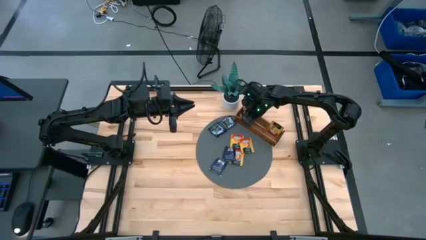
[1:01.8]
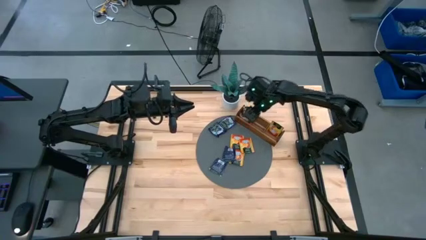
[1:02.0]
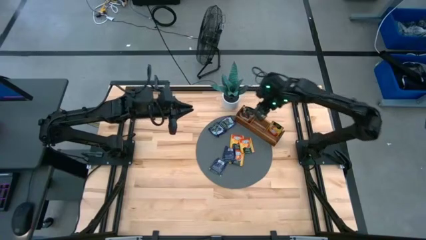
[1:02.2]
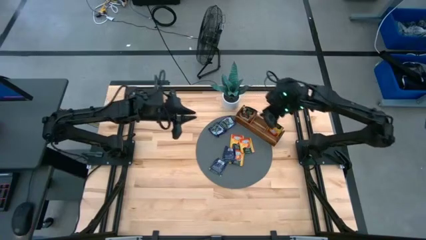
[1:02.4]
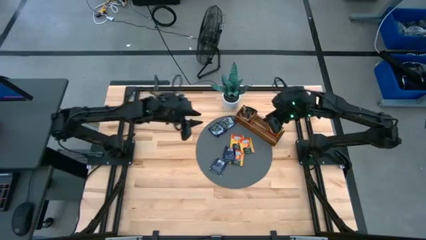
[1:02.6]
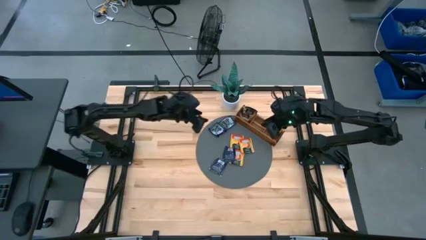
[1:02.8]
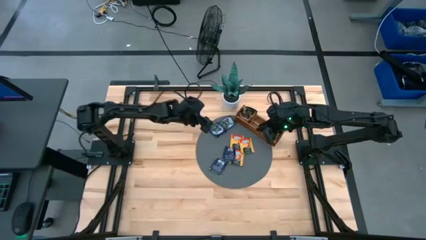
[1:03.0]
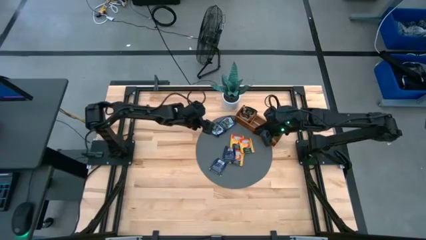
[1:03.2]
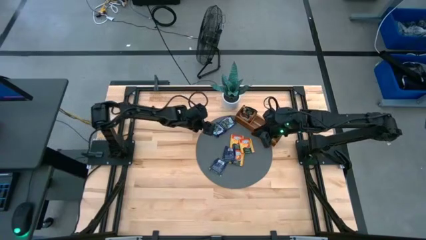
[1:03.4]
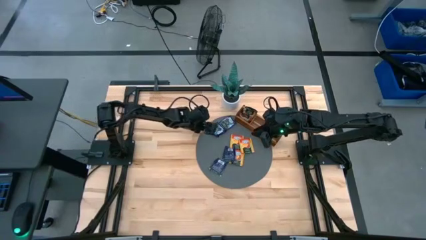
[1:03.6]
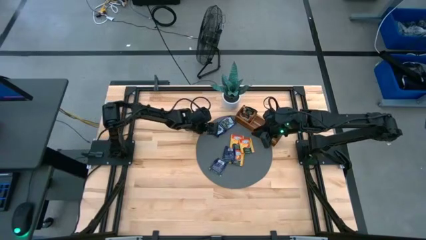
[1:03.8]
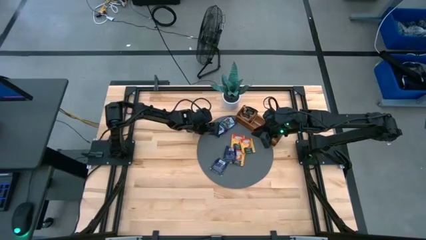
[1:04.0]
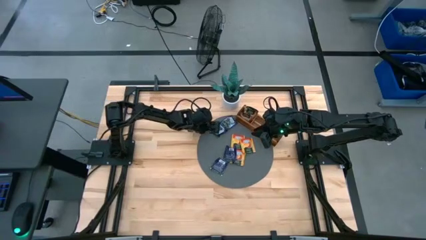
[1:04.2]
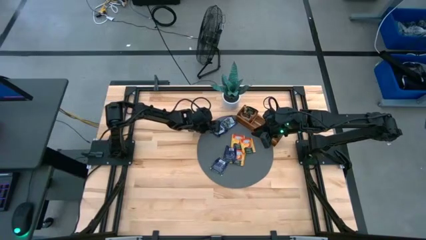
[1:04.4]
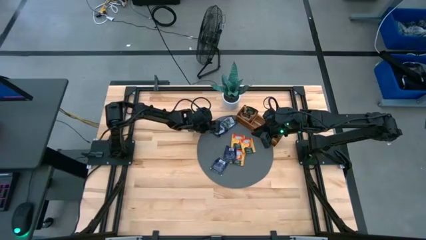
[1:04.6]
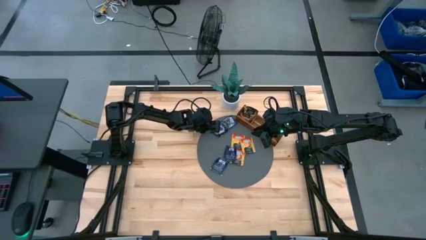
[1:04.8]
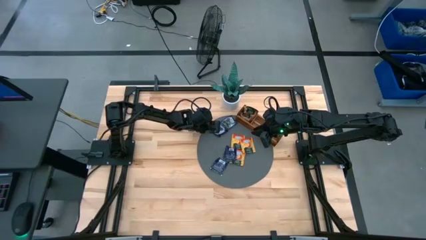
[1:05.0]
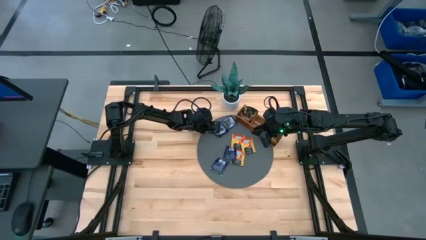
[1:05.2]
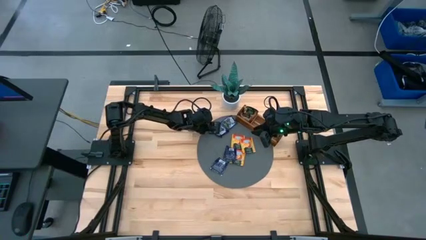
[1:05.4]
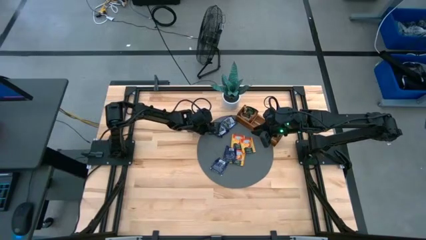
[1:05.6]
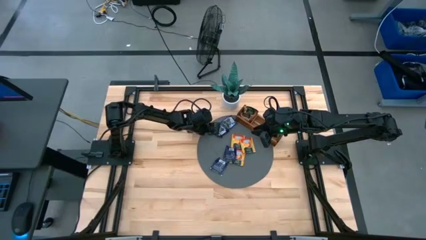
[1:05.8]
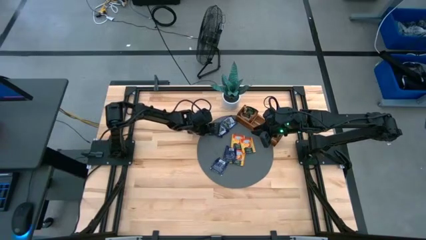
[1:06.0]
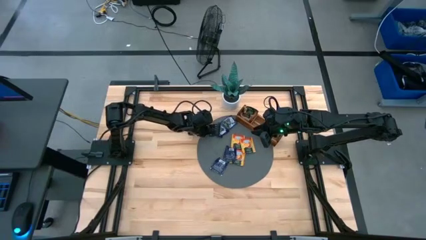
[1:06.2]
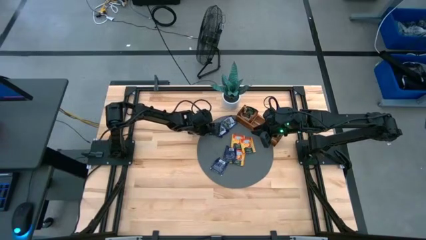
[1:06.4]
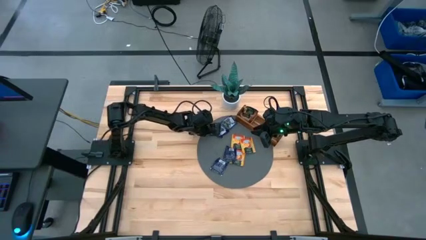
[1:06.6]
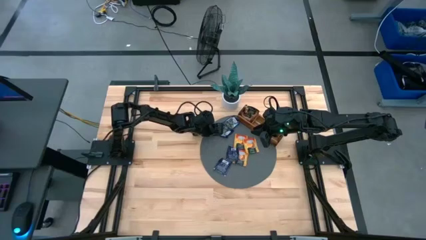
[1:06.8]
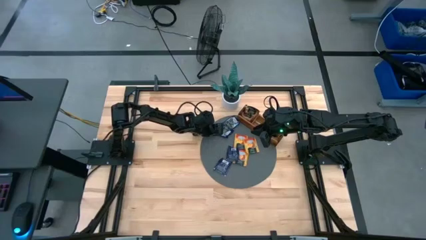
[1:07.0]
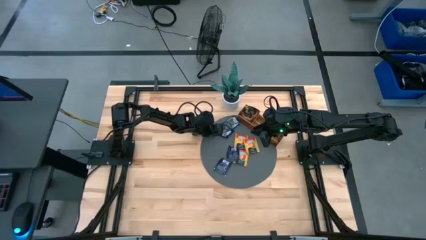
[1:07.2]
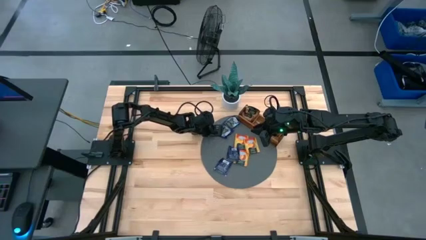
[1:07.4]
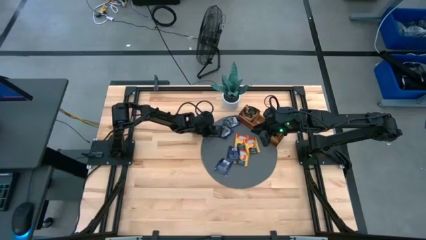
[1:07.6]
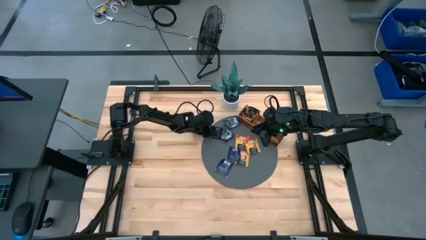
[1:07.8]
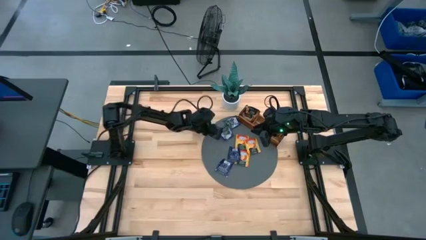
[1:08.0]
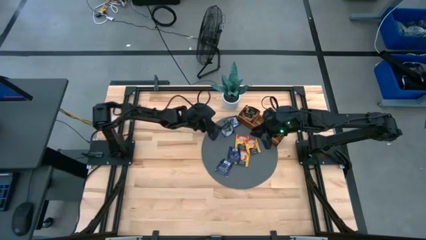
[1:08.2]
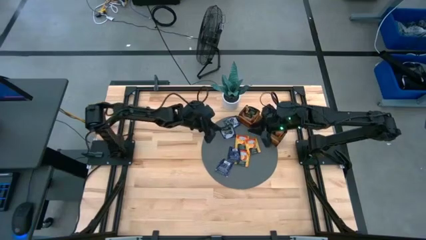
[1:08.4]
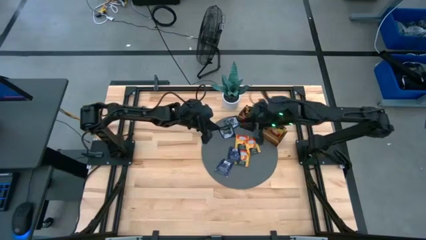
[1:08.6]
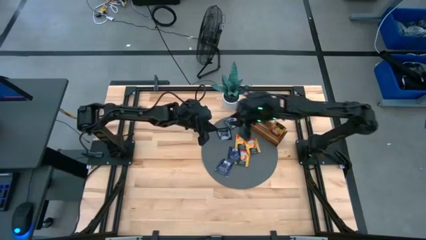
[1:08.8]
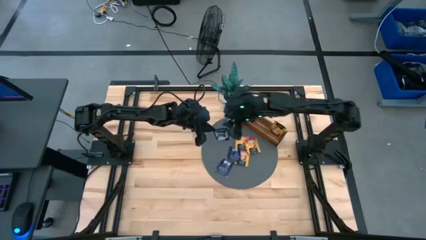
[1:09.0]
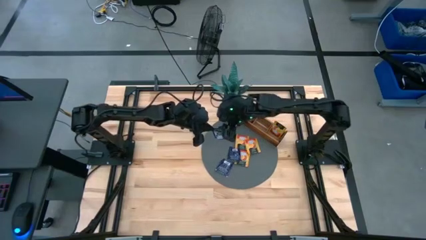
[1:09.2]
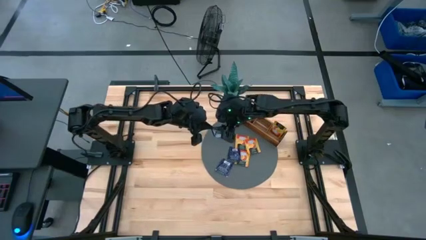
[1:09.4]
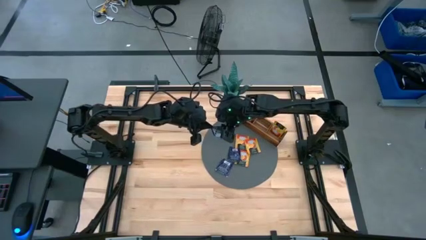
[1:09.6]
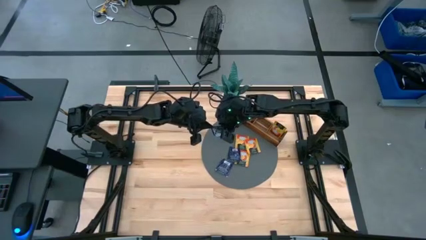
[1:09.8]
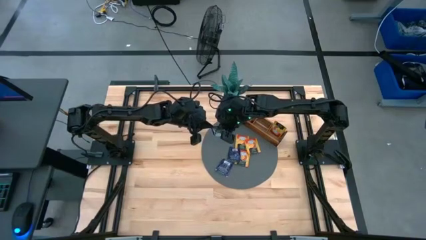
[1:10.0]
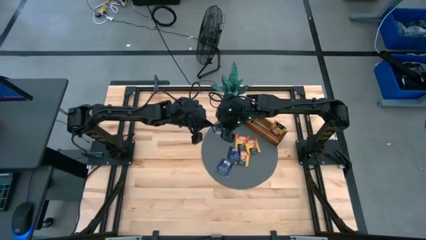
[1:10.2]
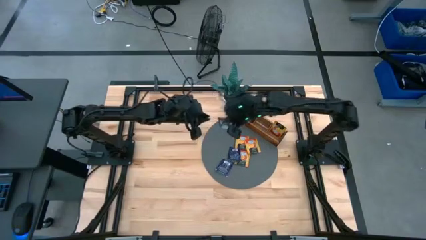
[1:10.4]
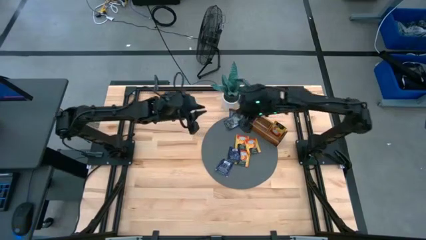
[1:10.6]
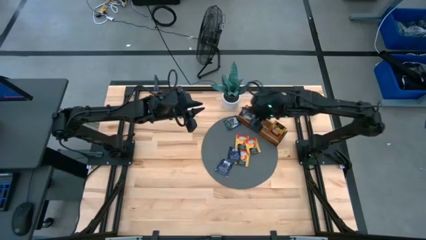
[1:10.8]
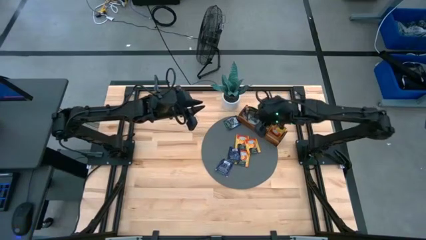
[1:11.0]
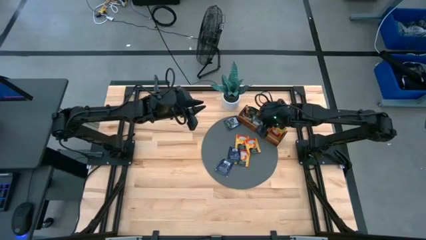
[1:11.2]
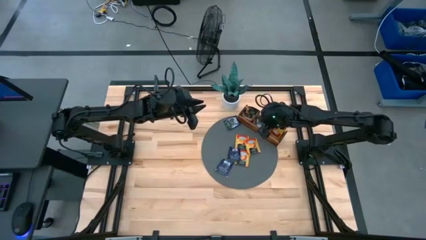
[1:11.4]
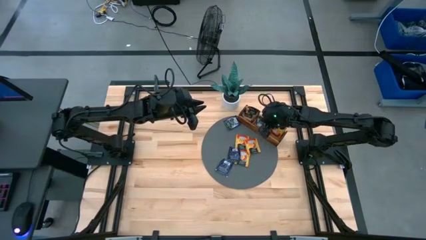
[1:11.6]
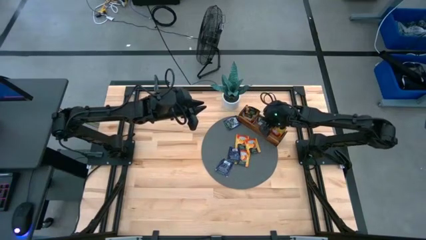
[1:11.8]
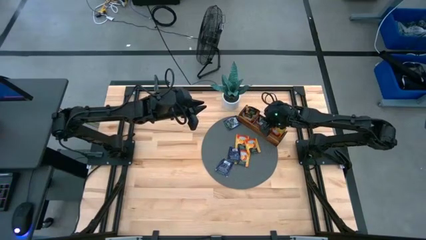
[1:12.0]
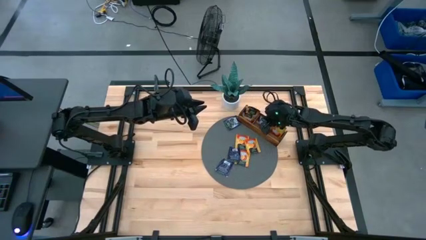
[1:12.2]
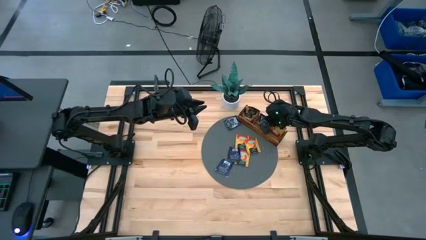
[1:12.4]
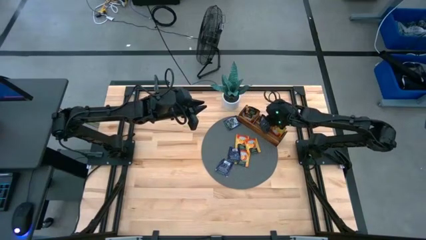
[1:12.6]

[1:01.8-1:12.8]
Task: Pick & Place Tea
Put the purple tea bag into the wooden organizer
